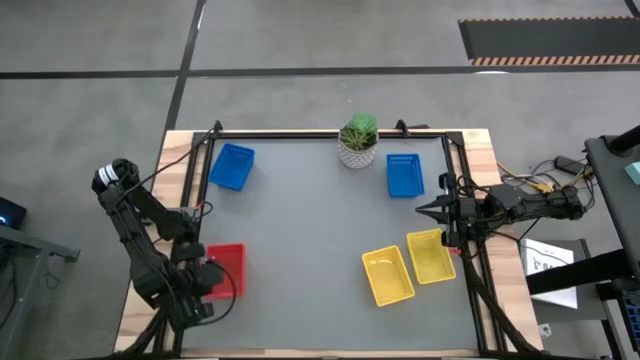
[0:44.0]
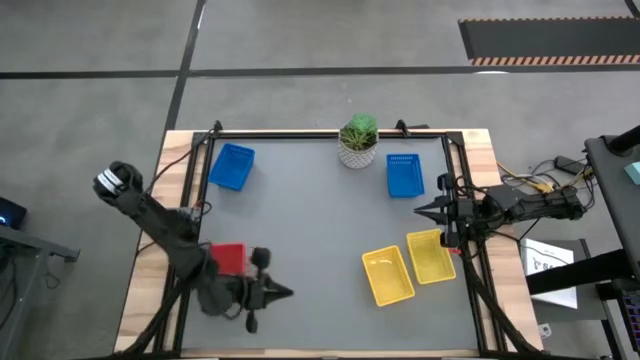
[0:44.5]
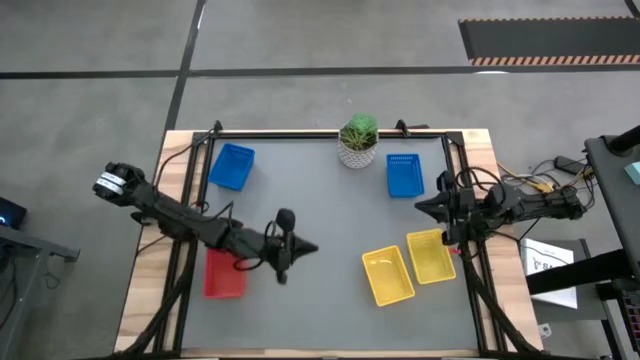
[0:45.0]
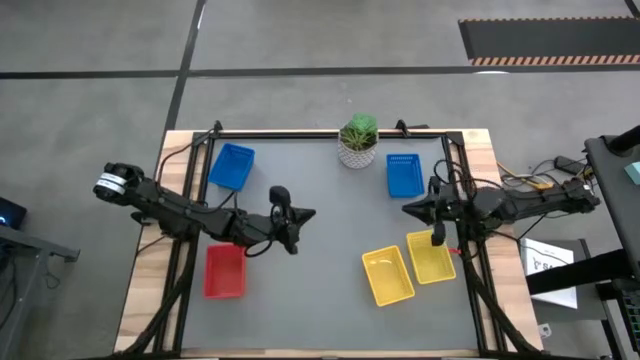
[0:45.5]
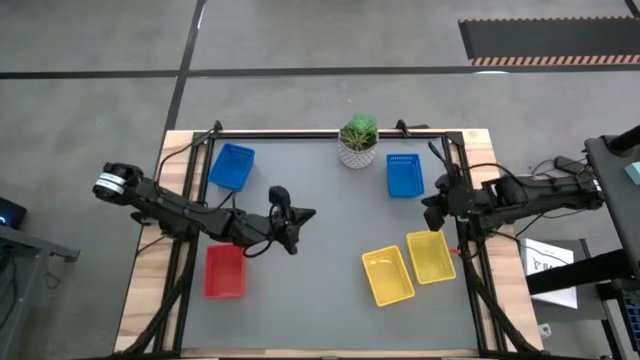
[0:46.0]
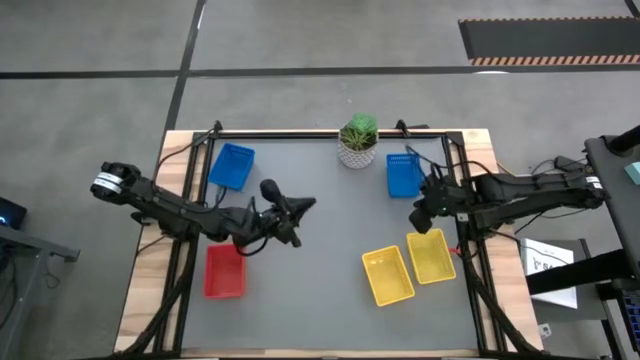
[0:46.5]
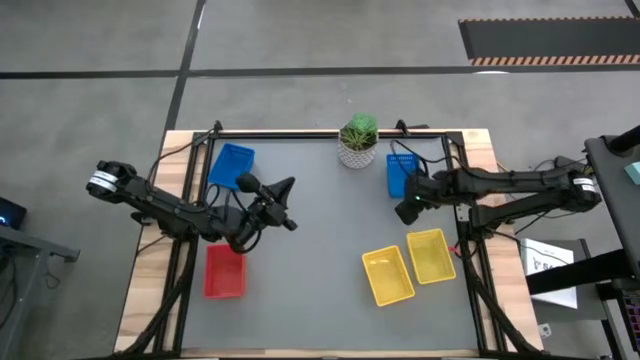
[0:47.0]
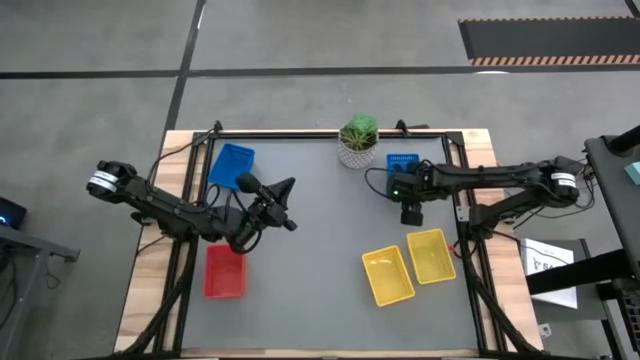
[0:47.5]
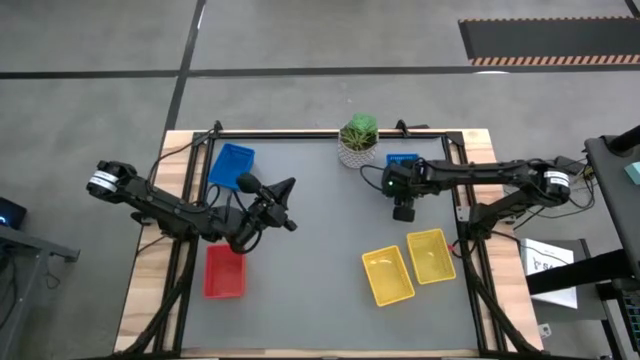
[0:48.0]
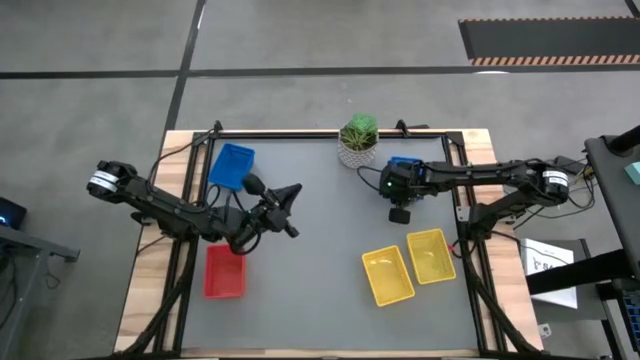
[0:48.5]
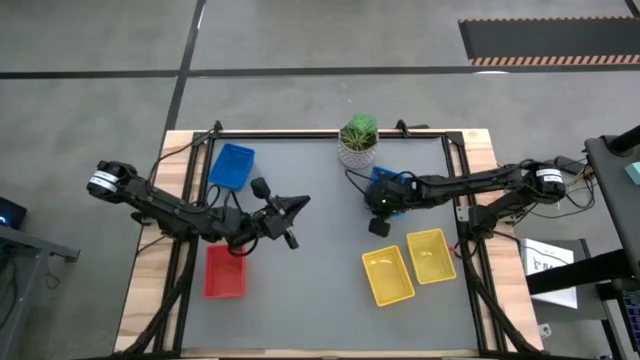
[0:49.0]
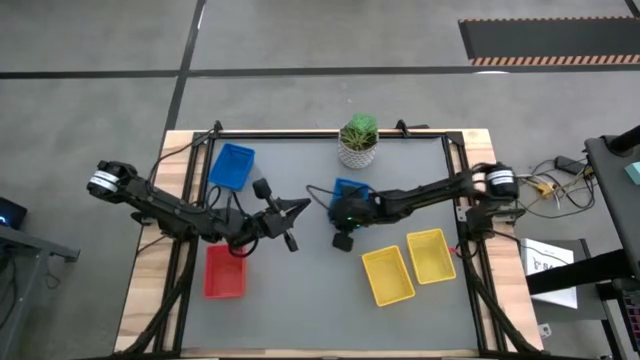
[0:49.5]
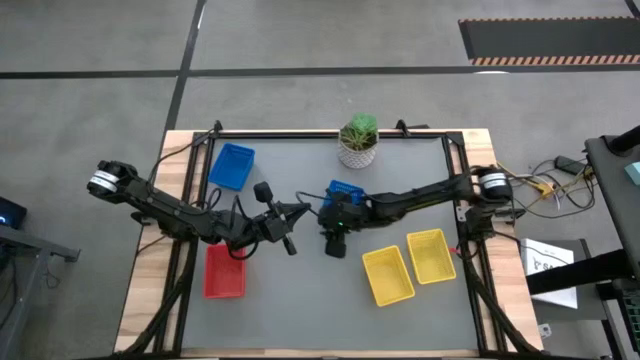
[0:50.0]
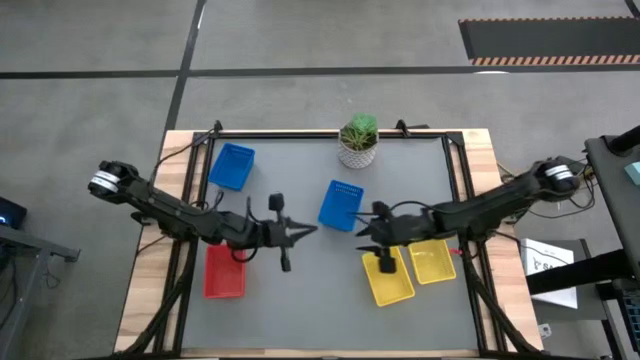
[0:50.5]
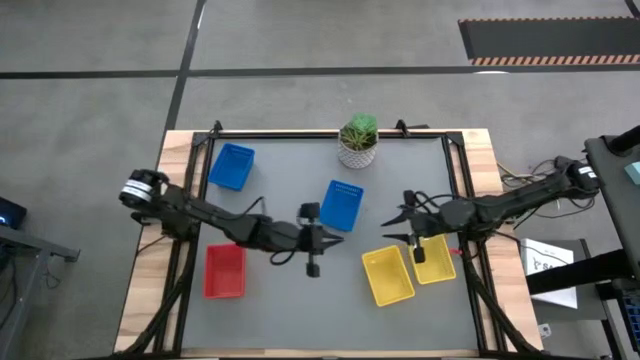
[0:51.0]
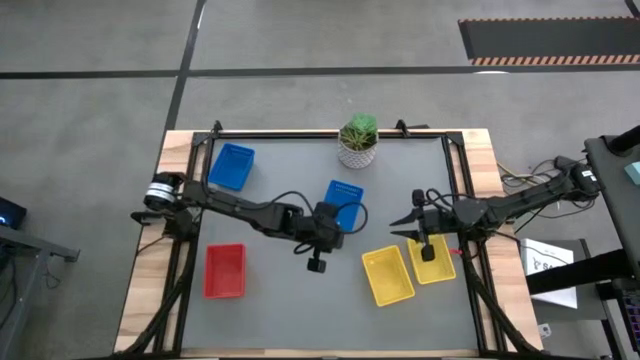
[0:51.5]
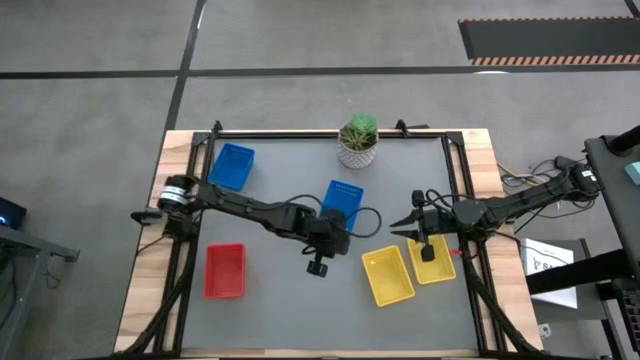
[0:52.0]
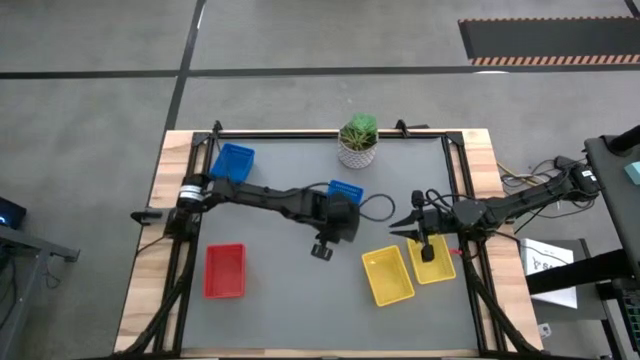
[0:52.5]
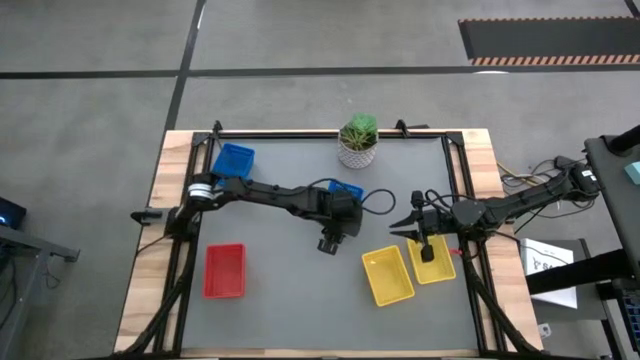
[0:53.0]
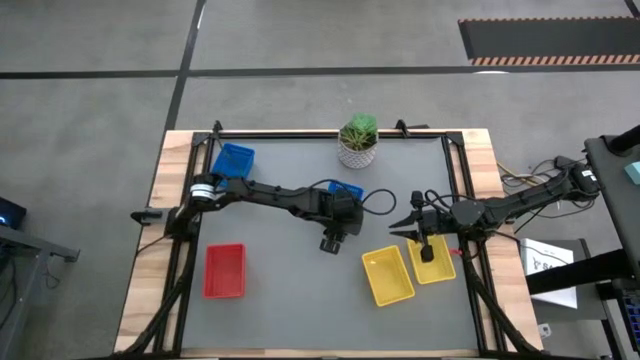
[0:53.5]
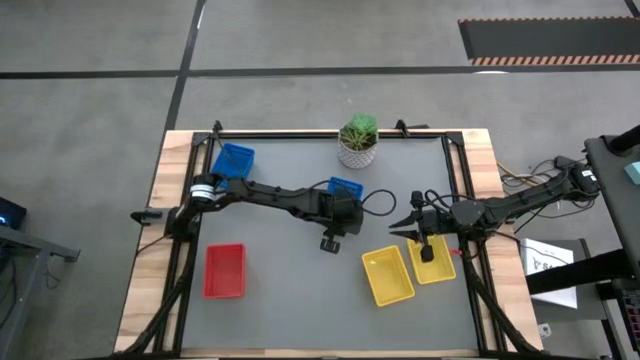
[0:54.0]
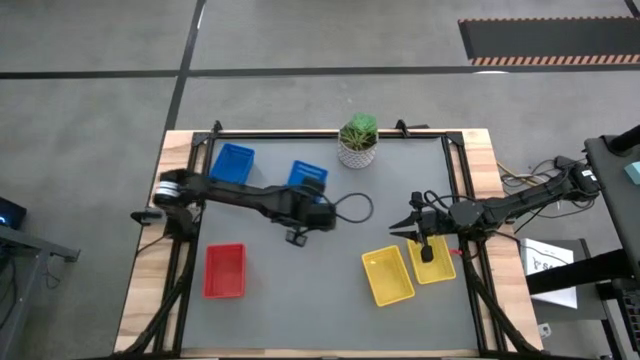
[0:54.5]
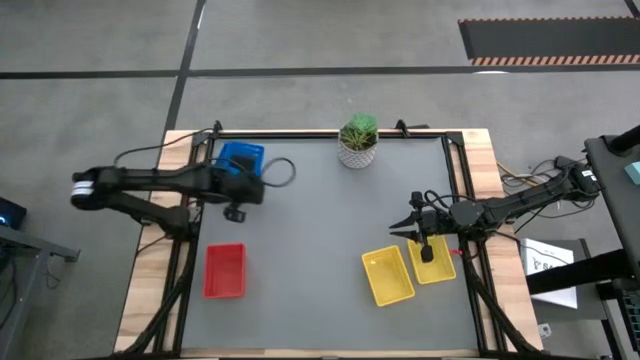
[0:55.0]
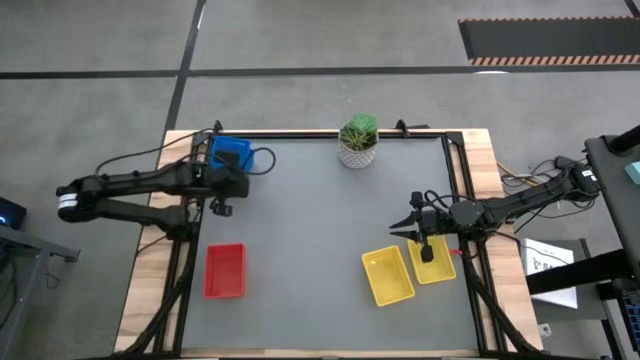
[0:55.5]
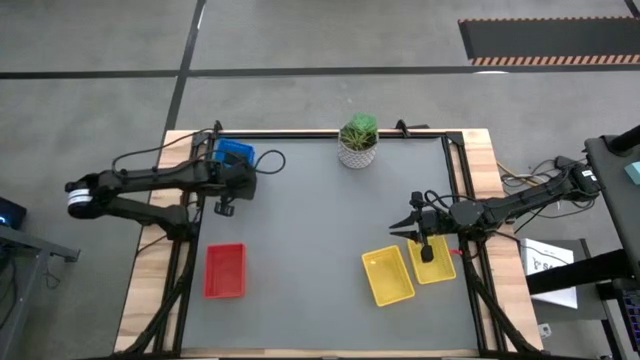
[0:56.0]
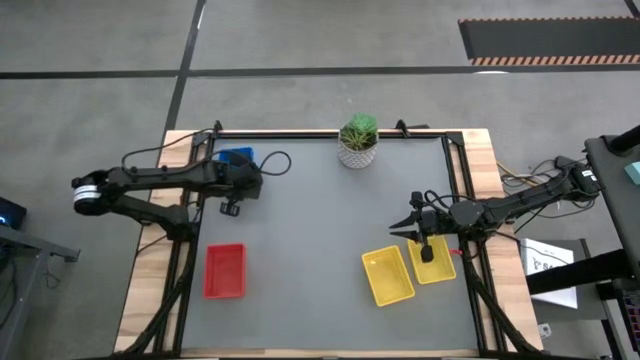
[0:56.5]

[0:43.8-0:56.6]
Stack the right blue bin on top of the left blue bin

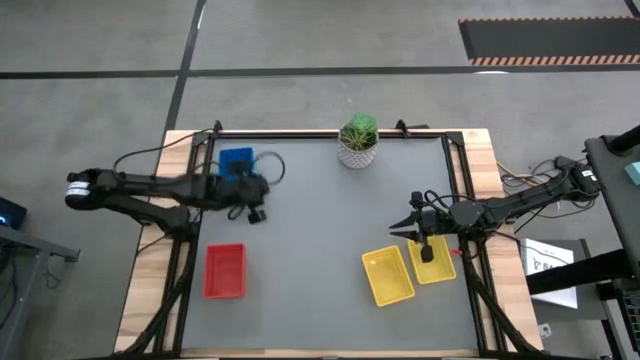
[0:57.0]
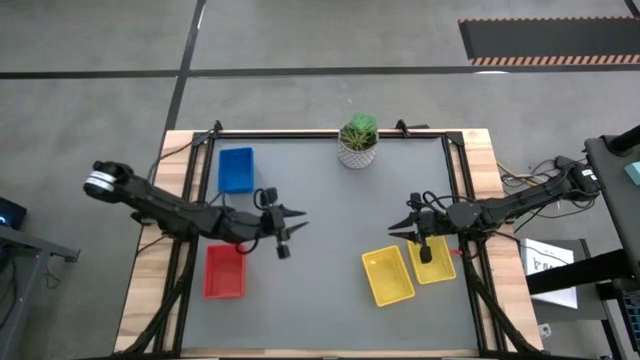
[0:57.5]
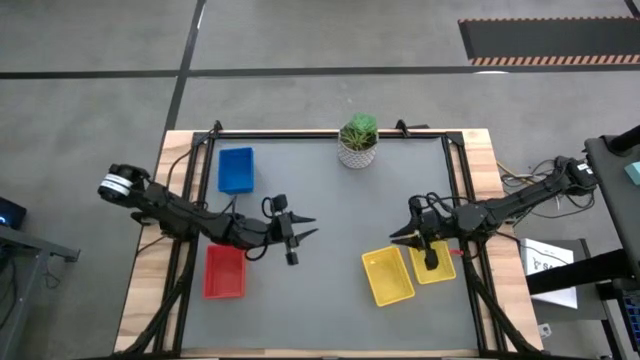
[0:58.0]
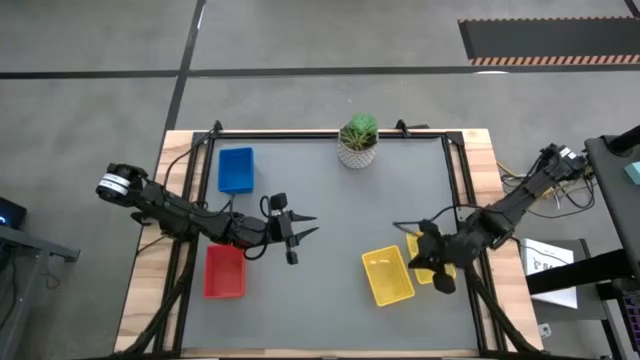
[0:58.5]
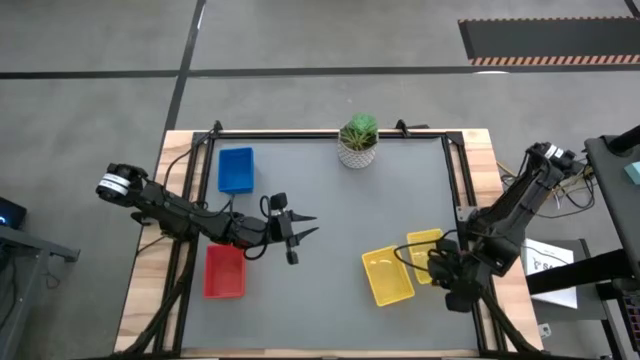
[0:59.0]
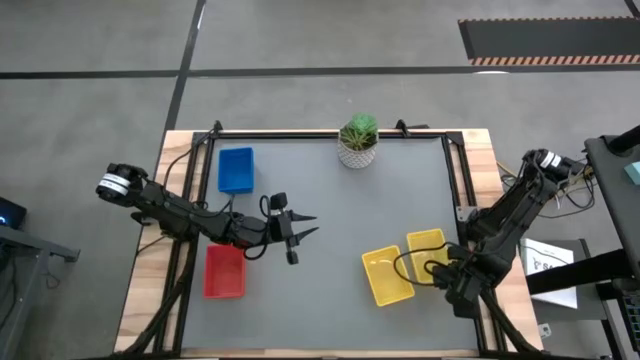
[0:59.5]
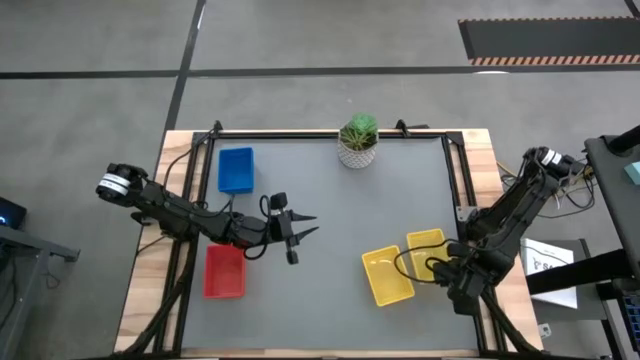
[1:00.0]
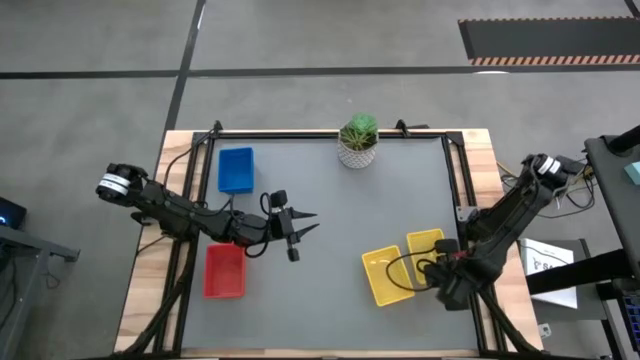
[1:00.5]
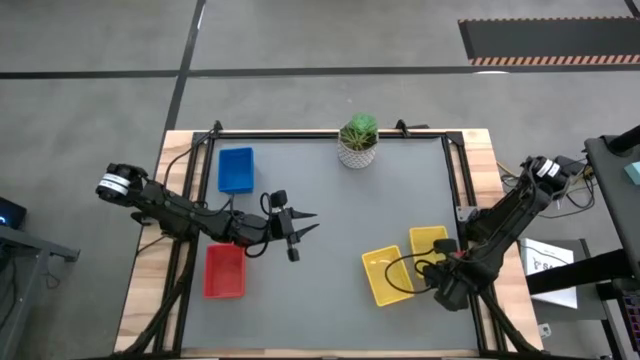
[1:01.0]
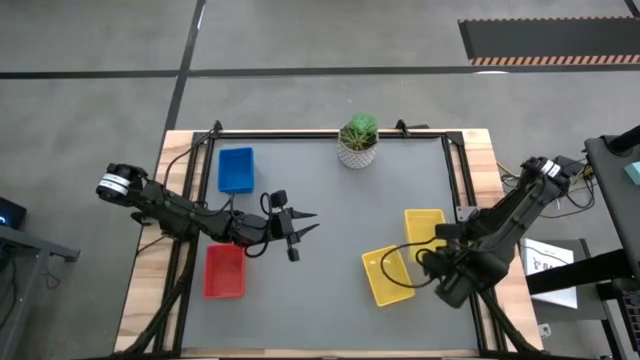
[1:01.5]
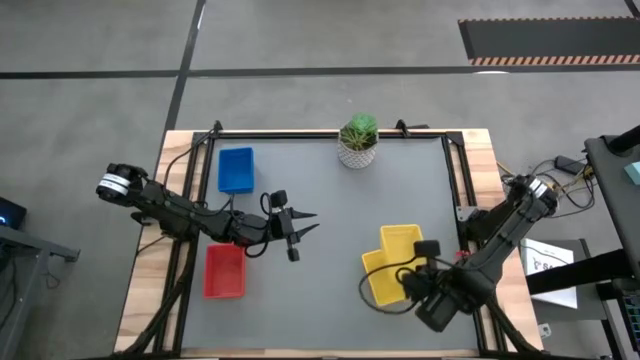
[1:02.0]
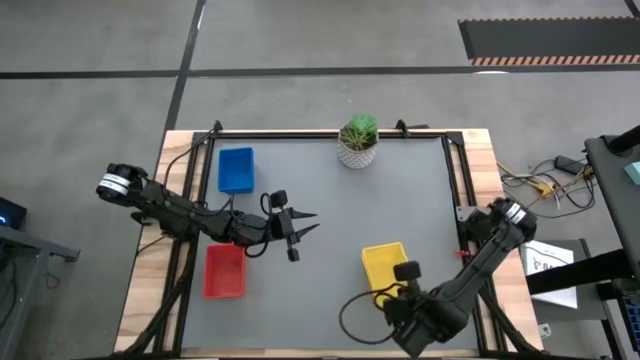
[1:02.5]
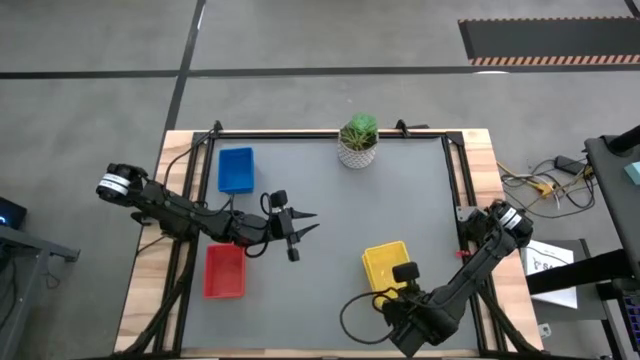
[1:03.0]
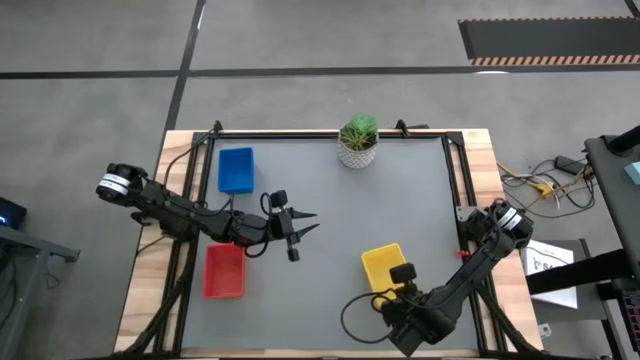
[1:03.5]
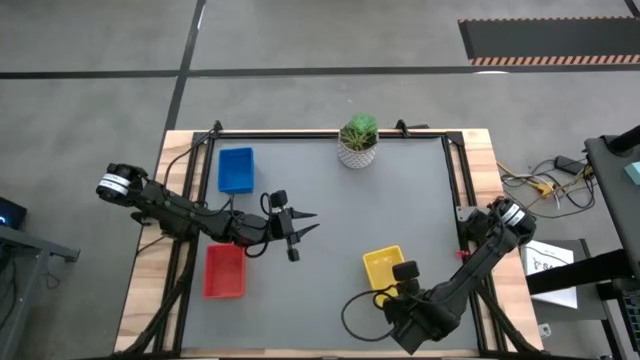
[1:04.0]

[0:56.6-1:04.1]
Stack the right yellow bin on top of the left yellow bin
